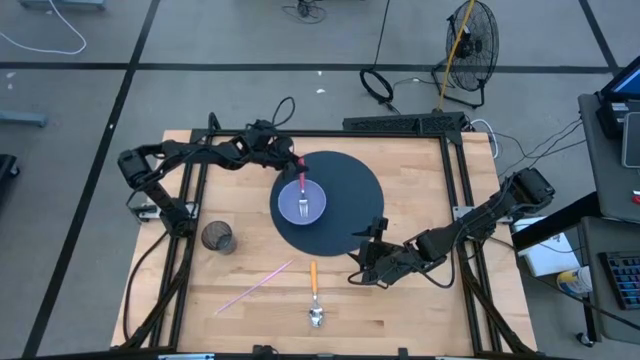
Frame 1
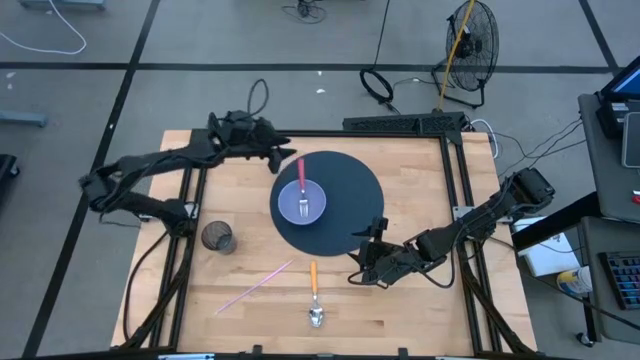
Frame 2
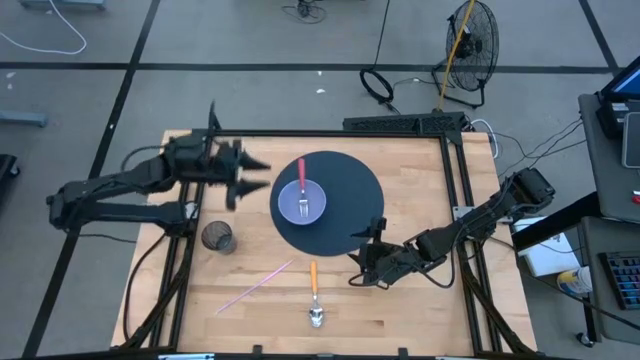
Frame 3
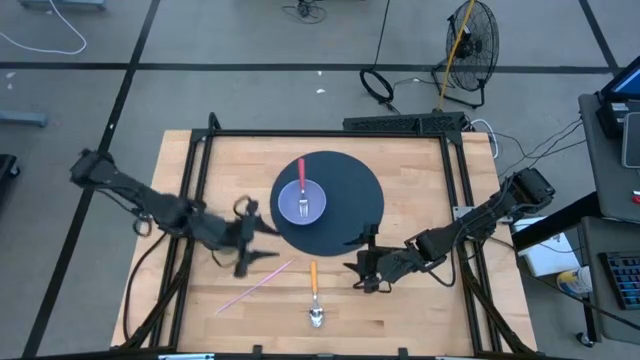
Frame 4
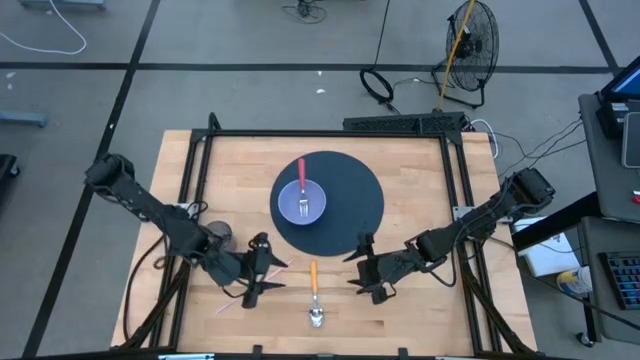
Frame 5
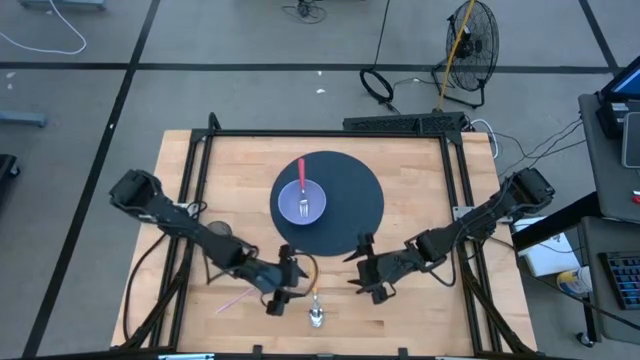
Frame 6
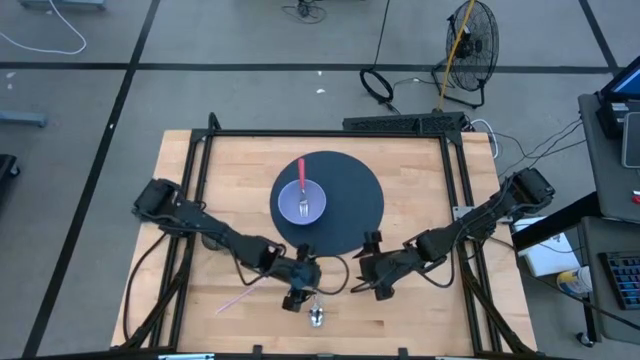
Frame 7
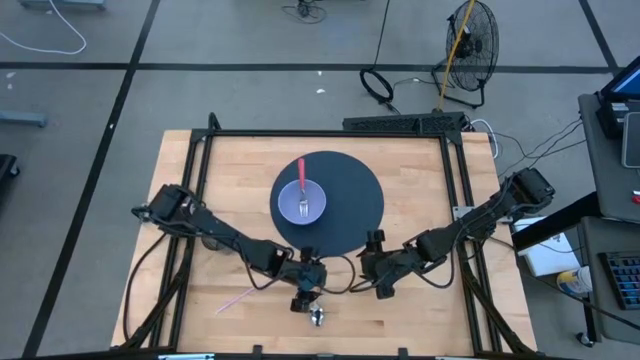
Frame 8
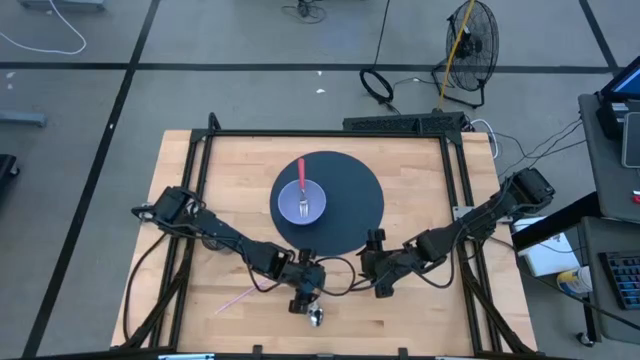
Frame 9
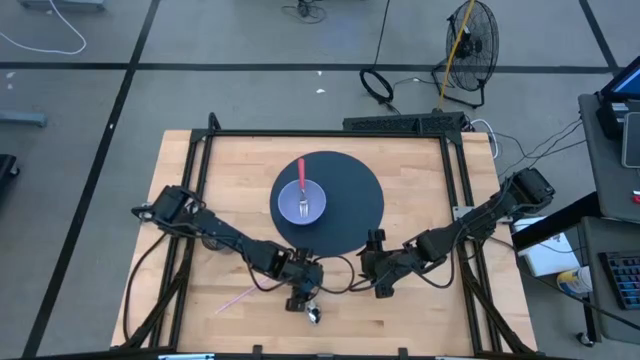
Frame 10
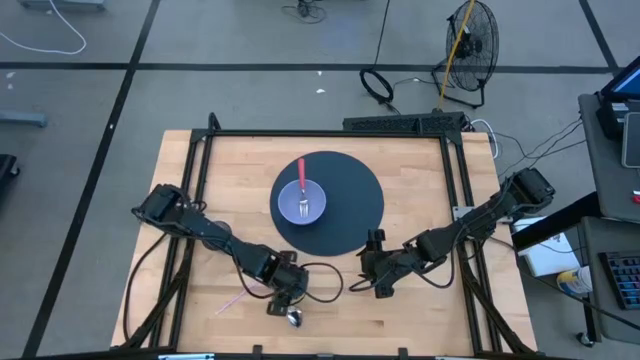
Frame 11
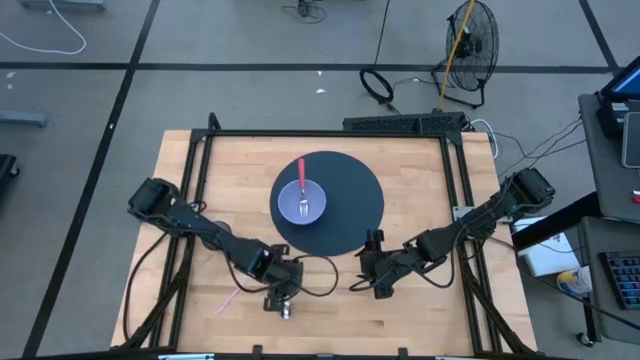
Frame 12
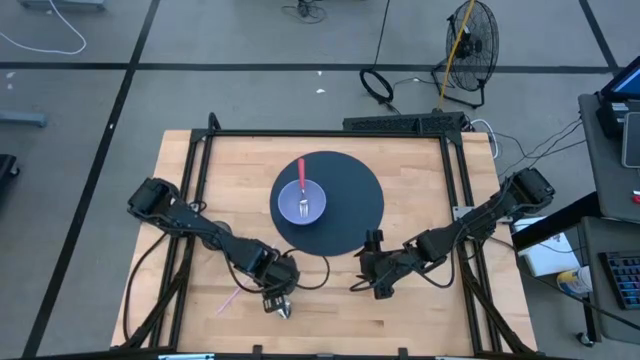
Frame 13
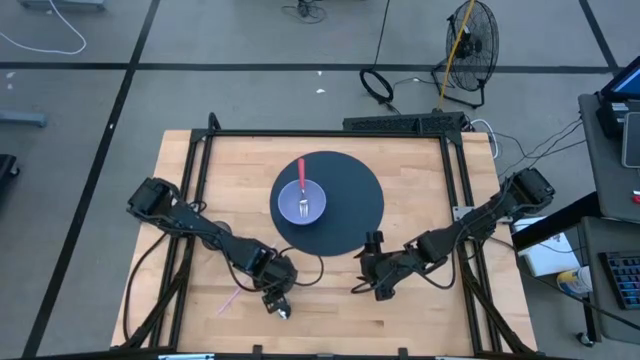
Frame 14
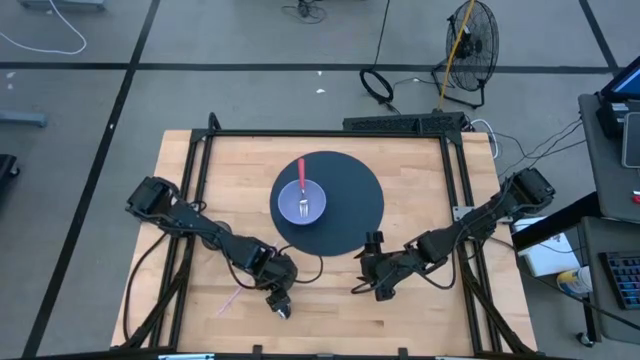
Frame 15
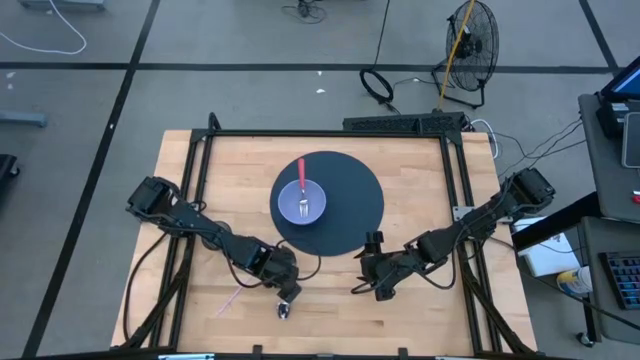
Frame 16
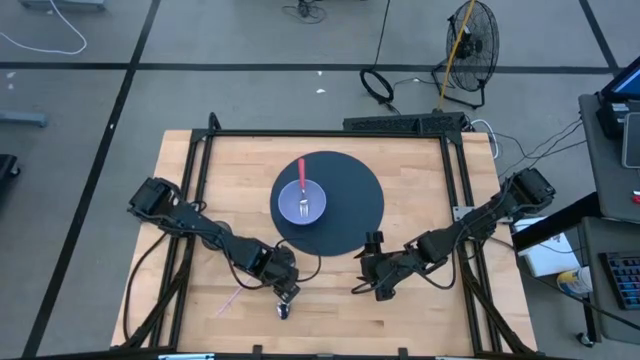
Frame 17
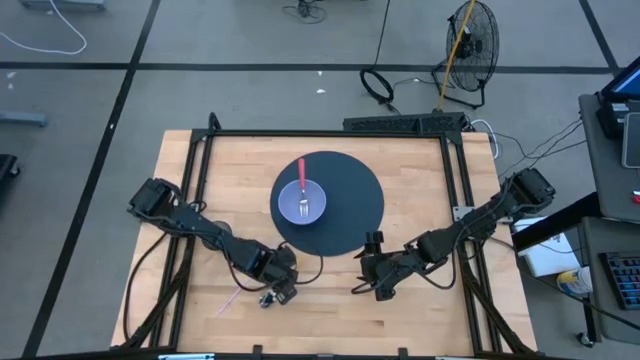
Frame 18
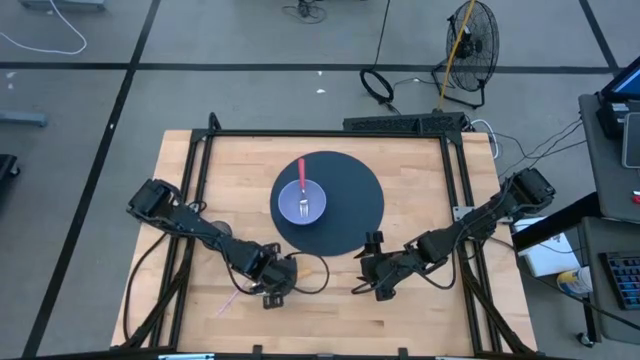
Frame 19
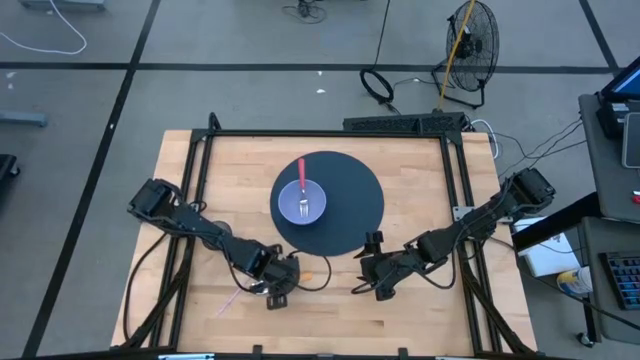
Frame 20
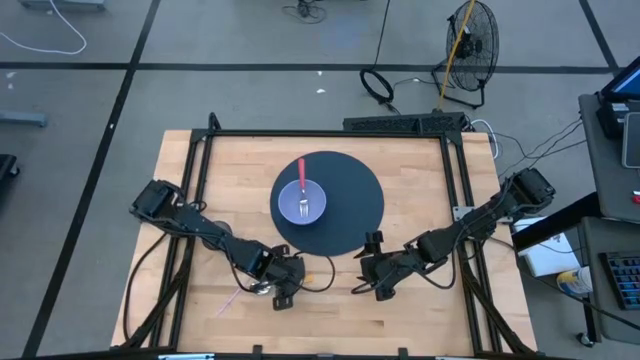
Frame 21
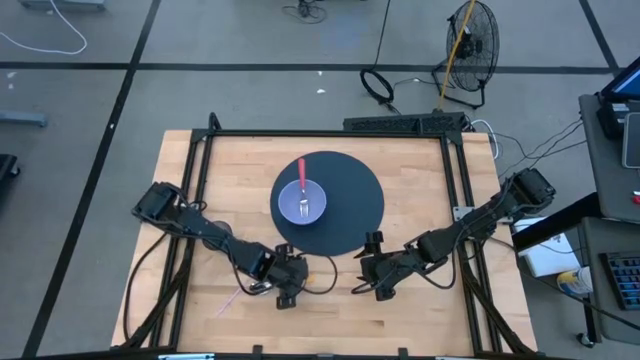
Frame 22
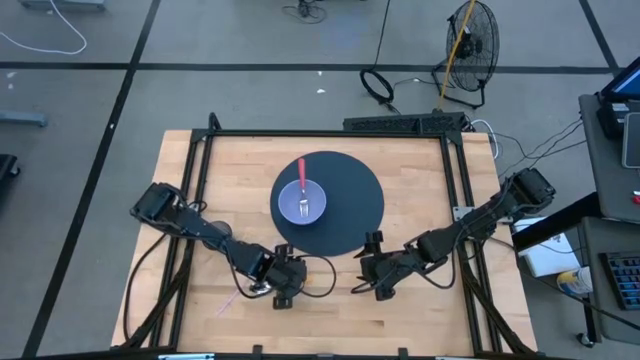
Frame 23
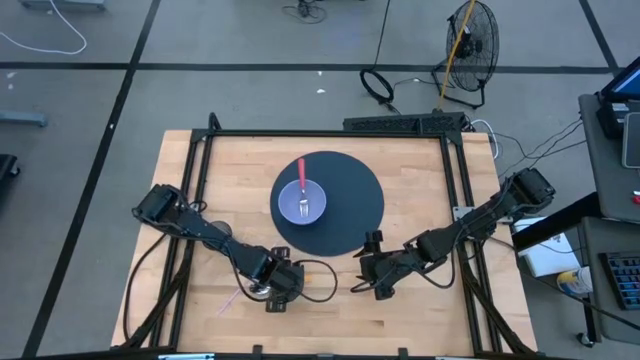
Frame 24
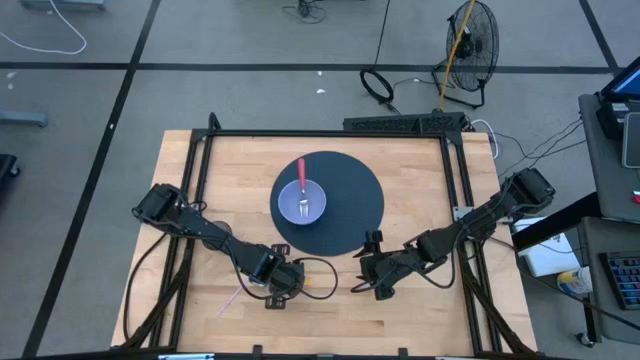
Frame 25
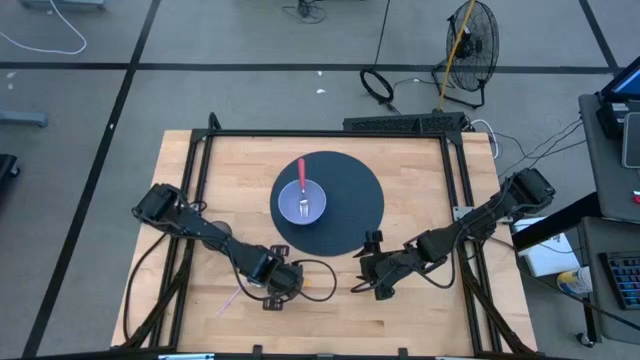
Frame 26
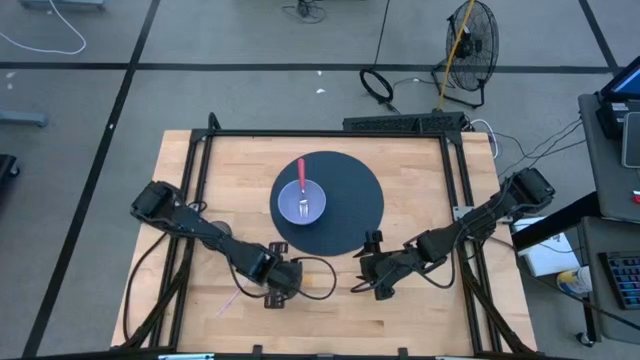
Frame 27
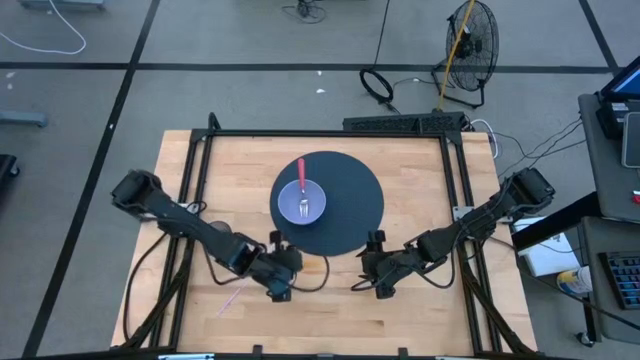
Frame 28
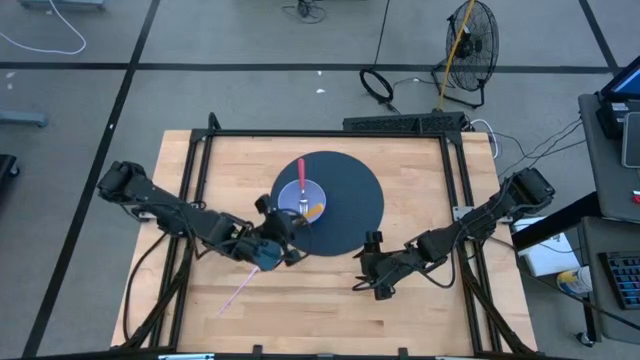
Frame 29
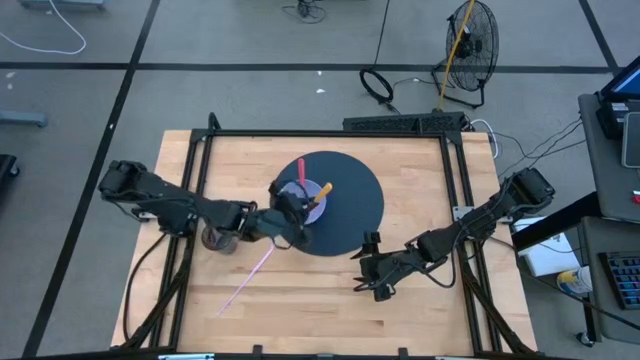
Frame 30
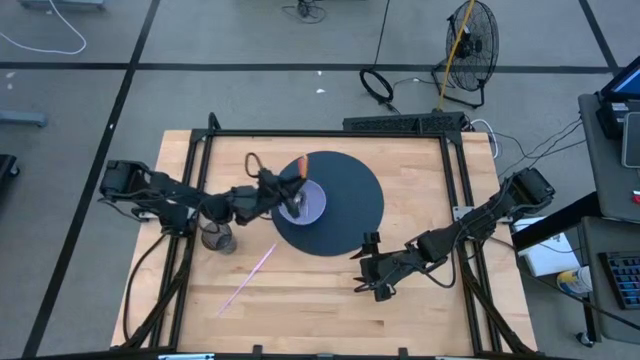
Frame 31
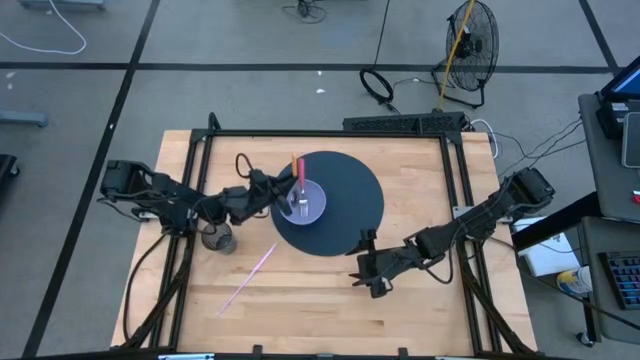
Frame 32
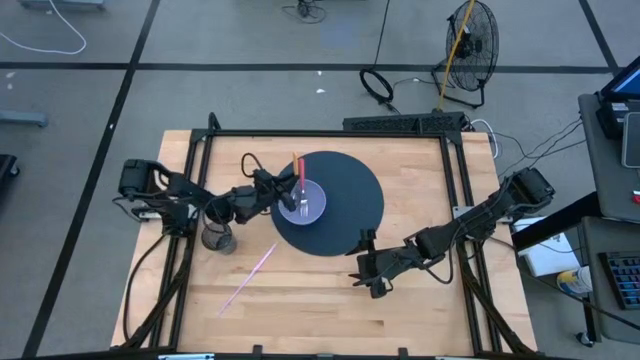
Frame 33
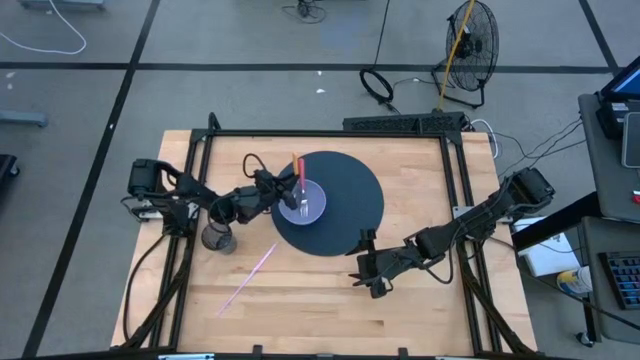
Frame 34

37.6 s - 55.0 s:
Task: Pick & Place Utensil
Put the yellow spoon into the purple bowl on the mat
